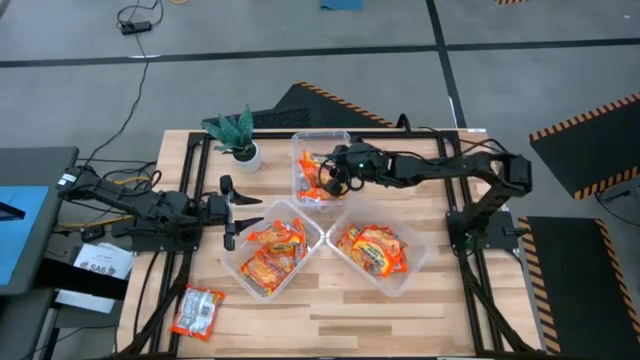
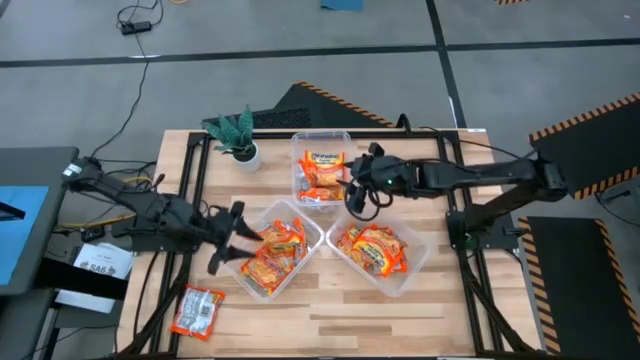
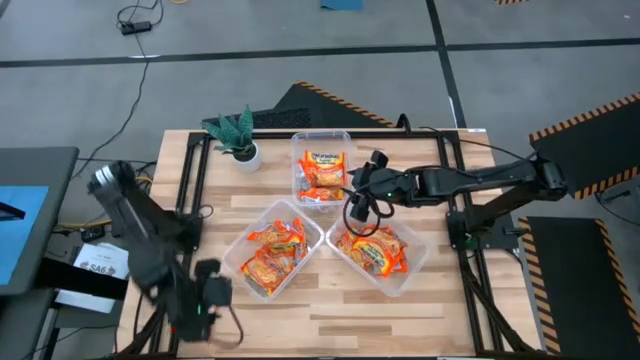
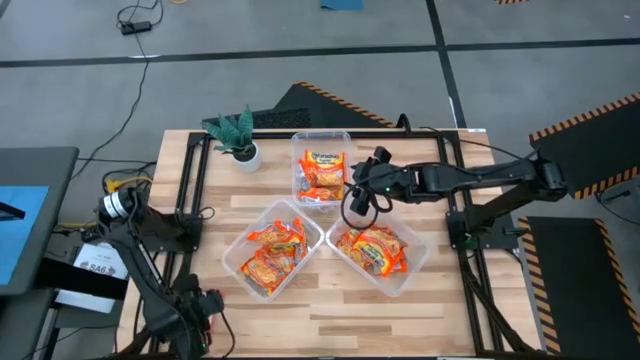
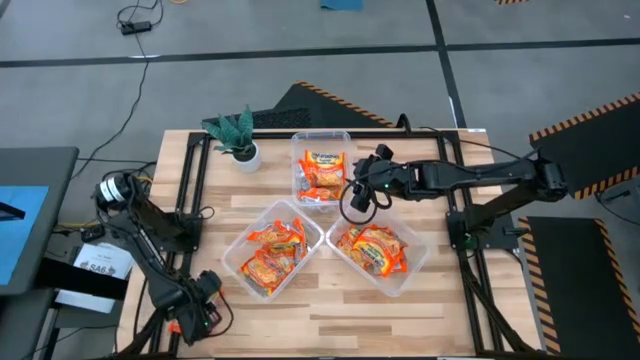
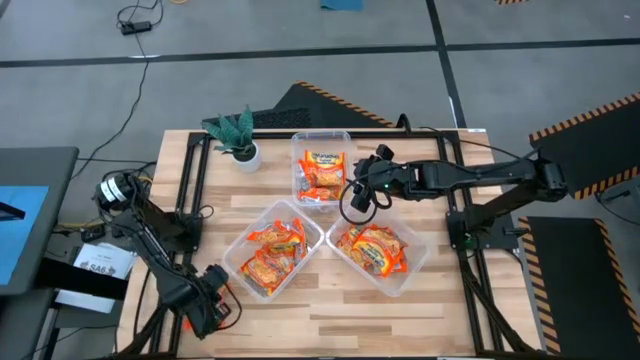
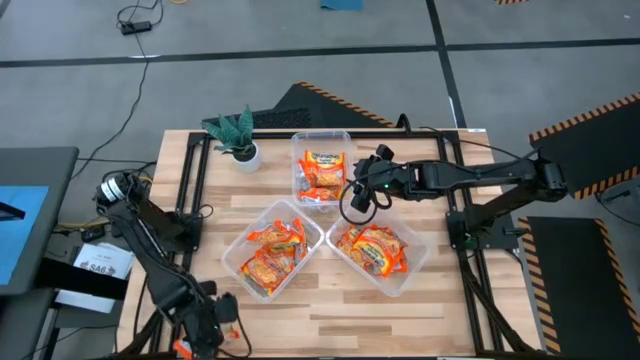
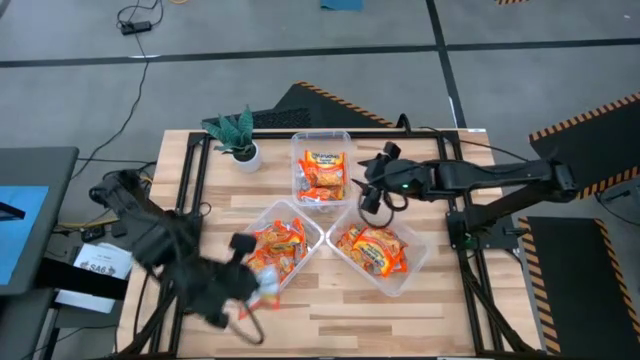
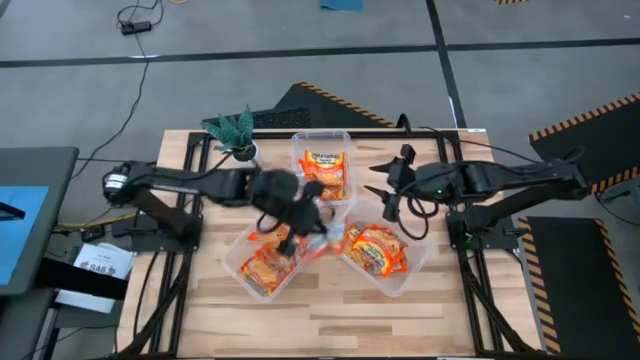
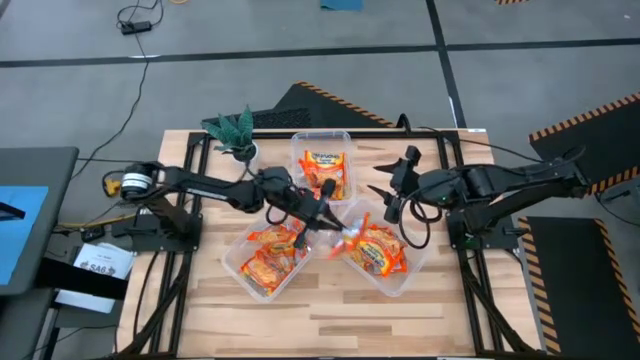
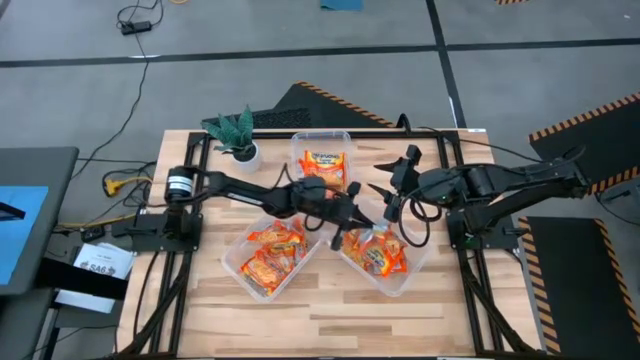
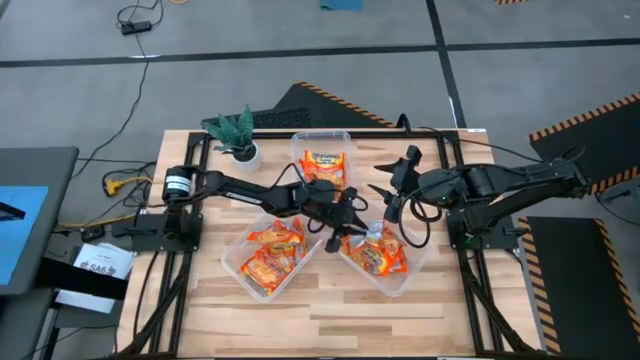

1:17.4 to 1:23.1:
Task: Sort Maruchan noodles
Put the orange noodle pack into the bottom right transparent container

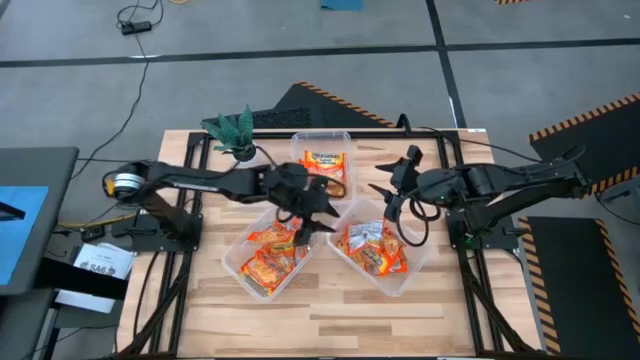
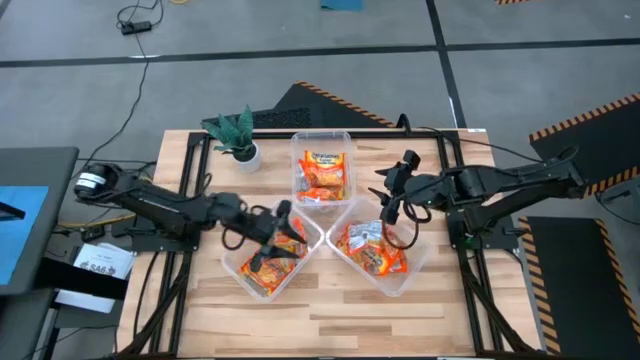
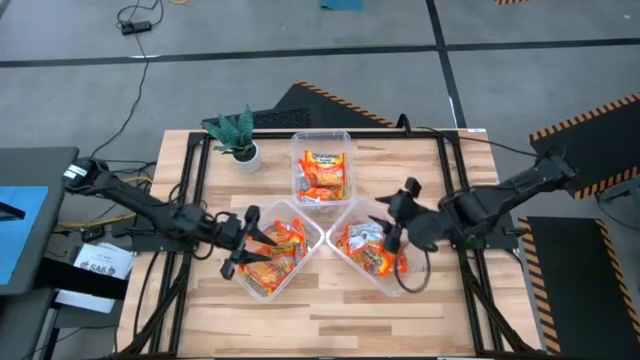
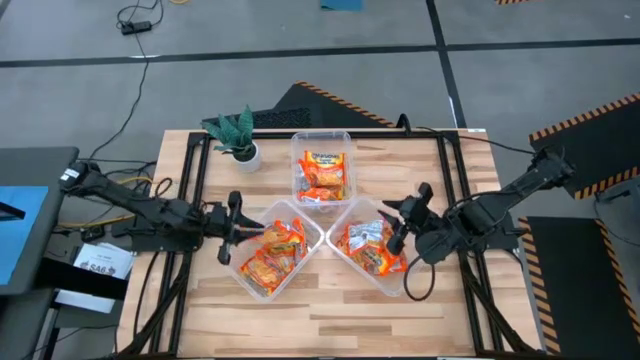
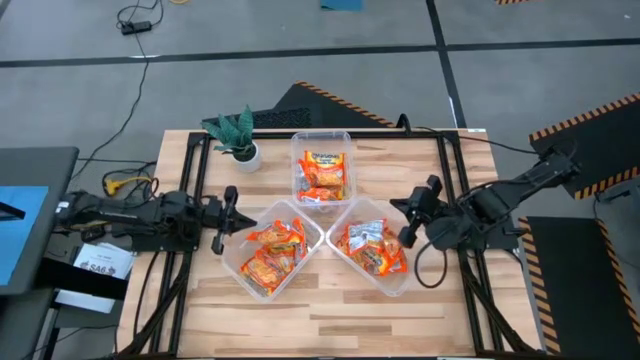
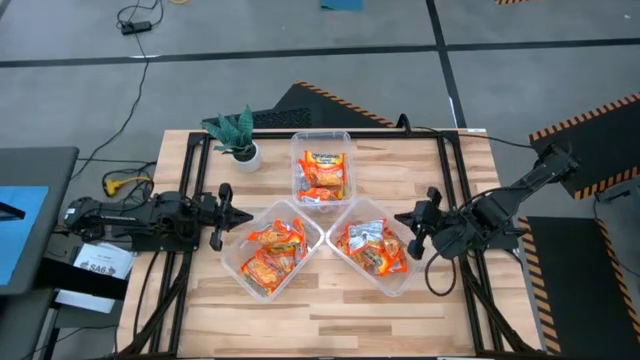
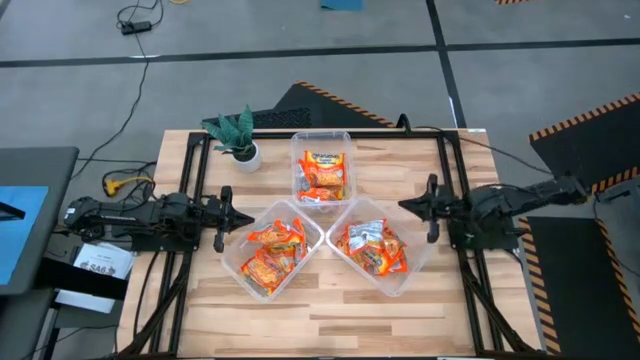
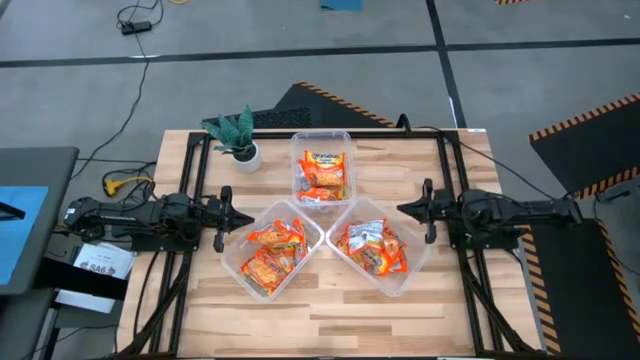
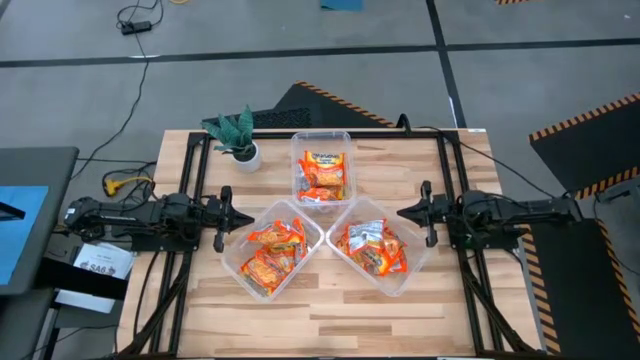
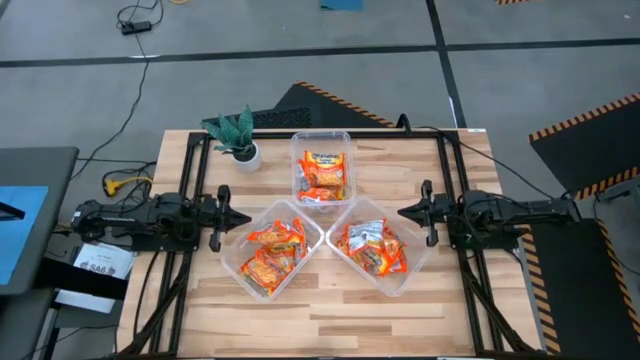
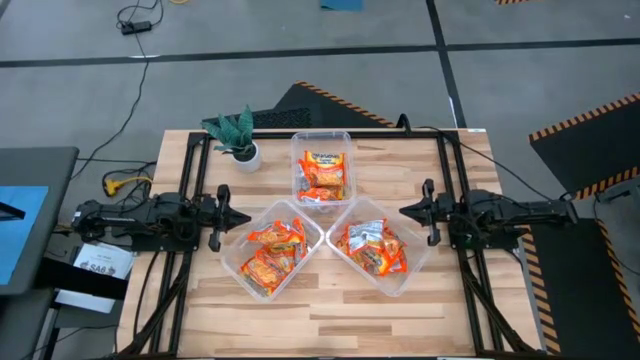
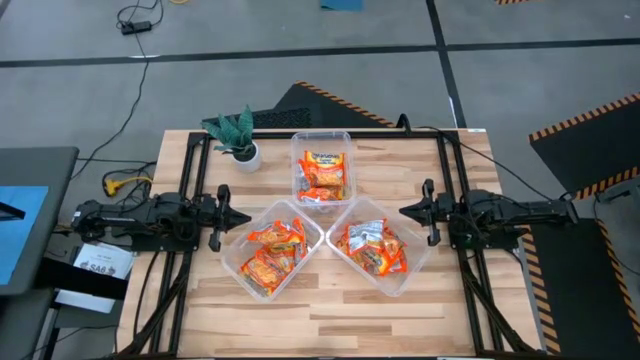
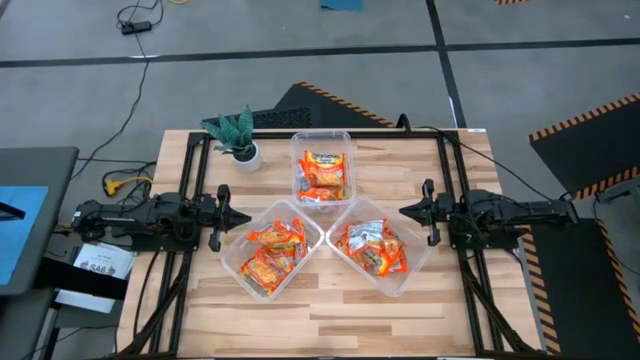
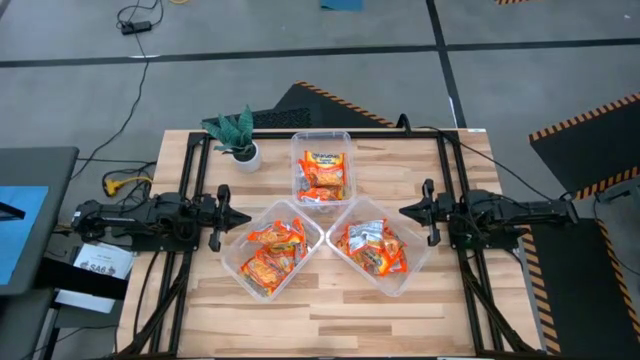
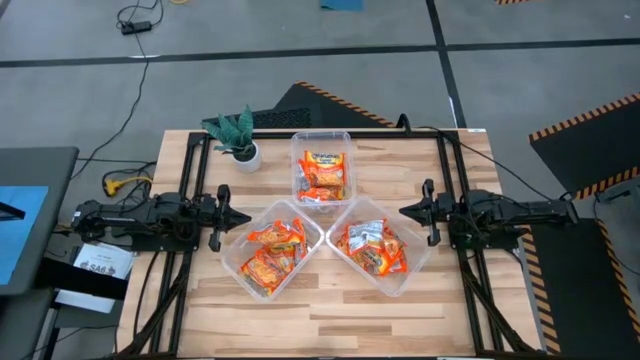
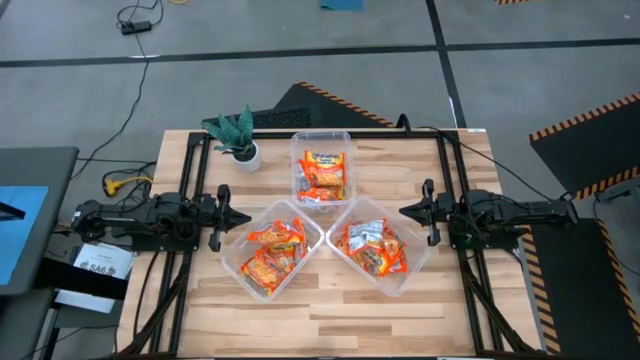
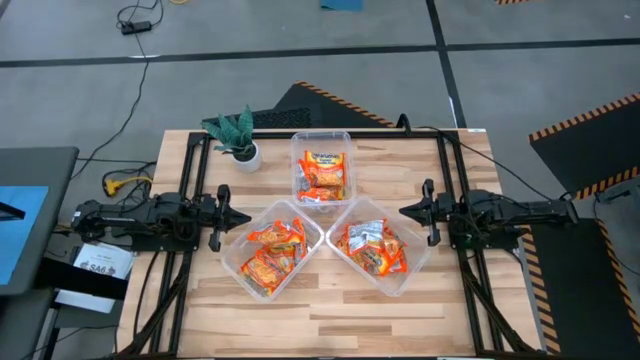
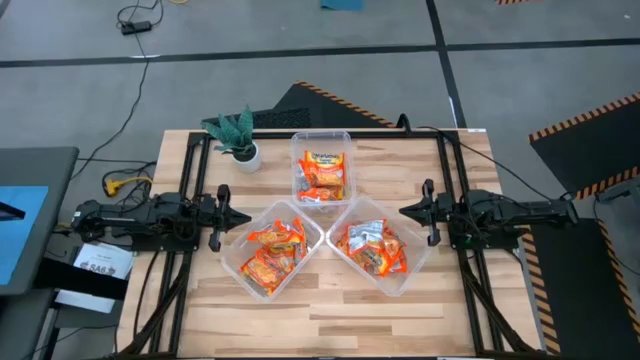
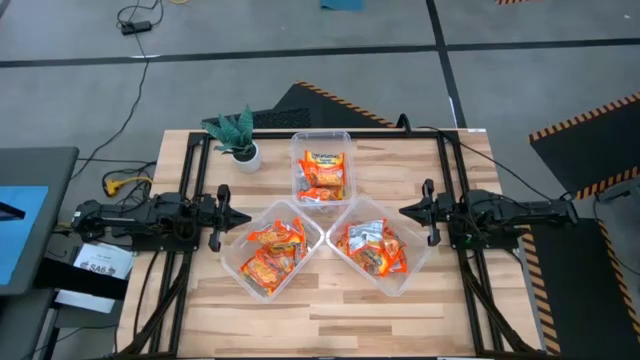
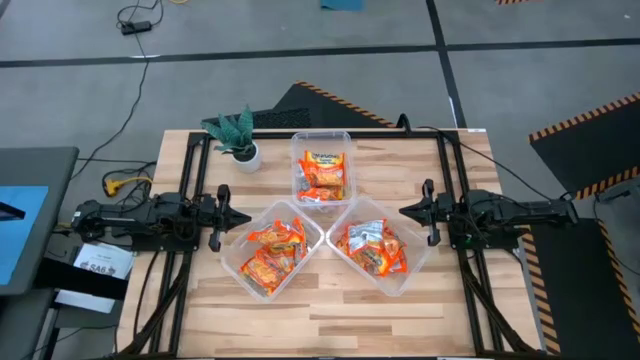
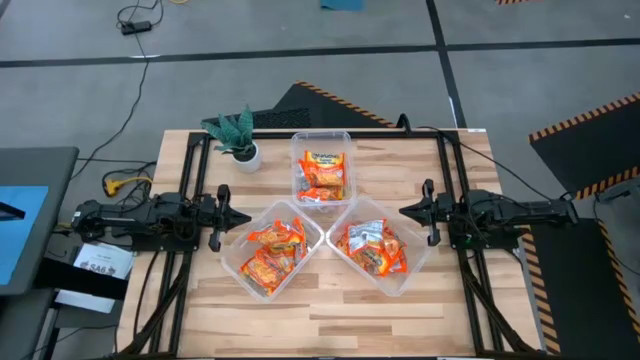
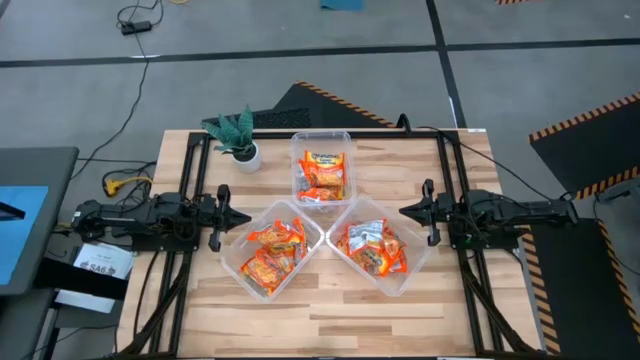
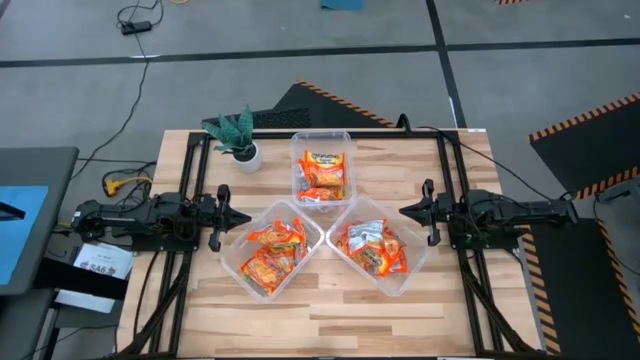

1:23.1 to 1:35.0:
Return to Home Position

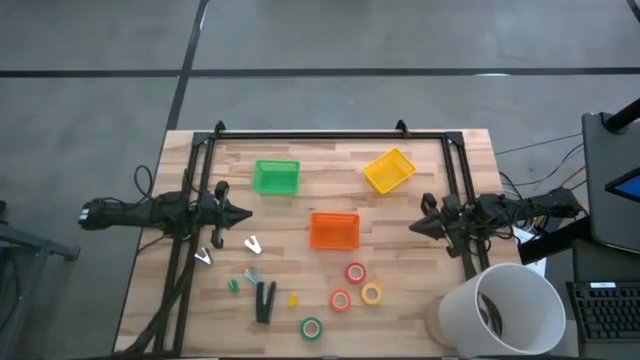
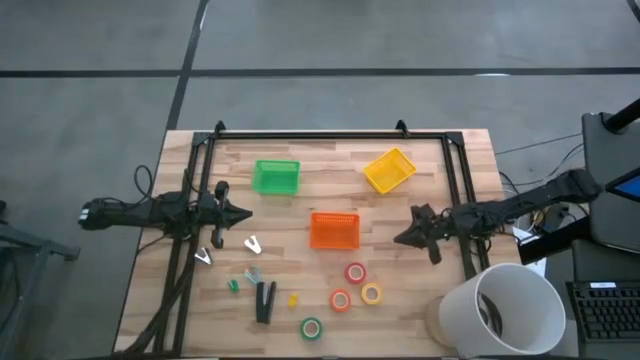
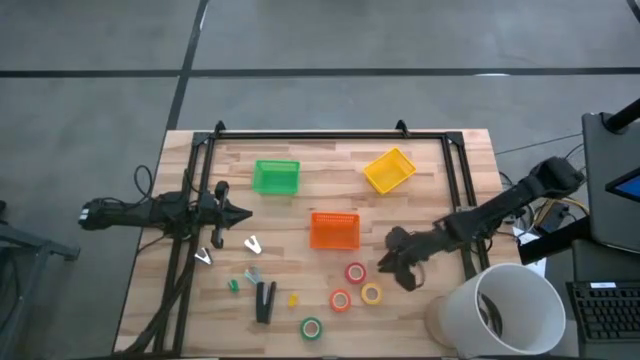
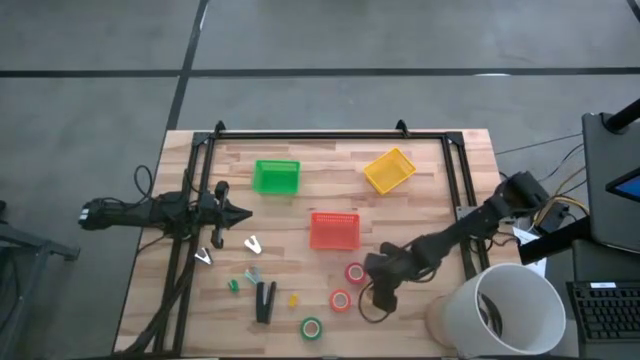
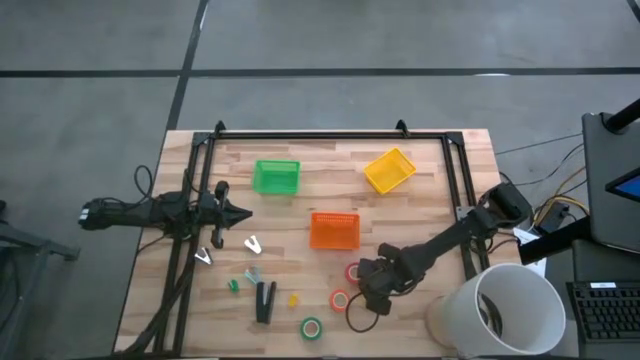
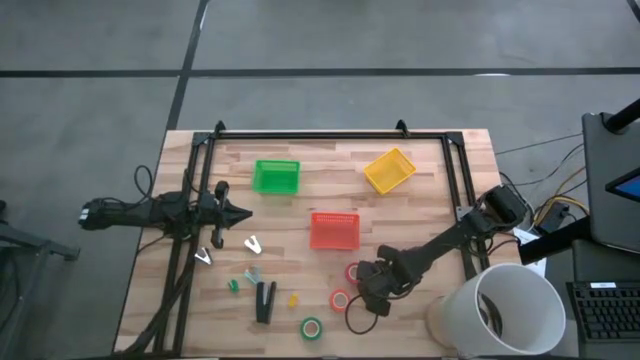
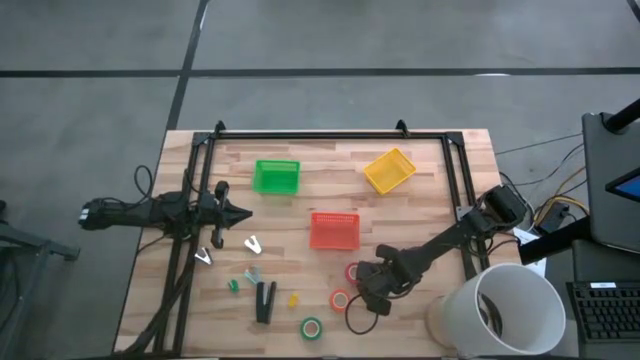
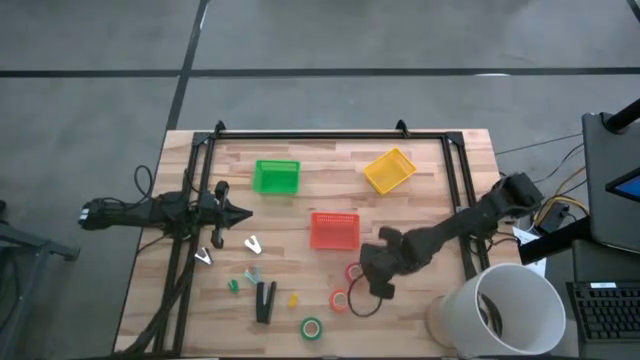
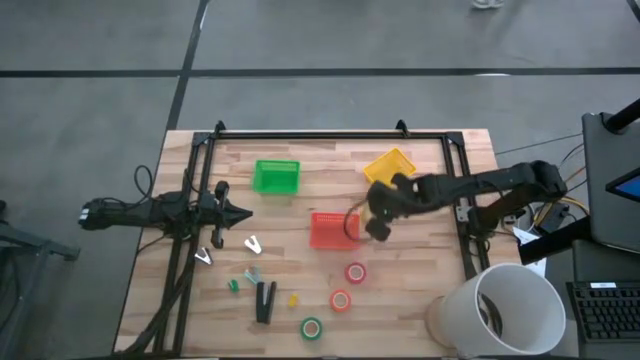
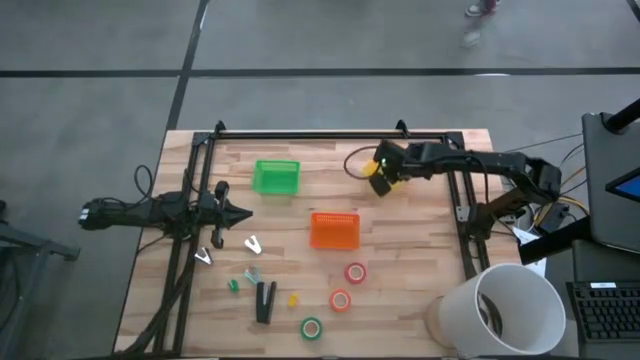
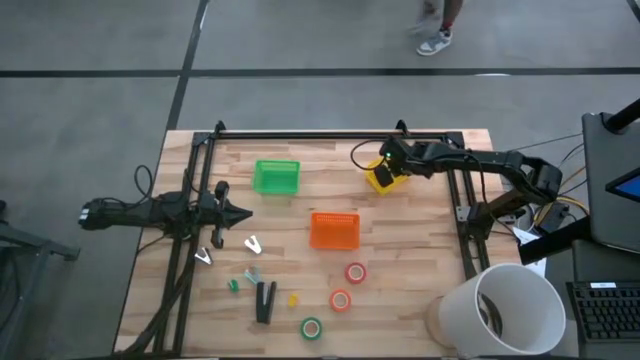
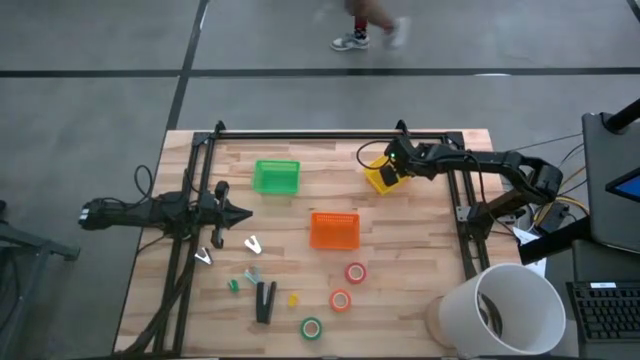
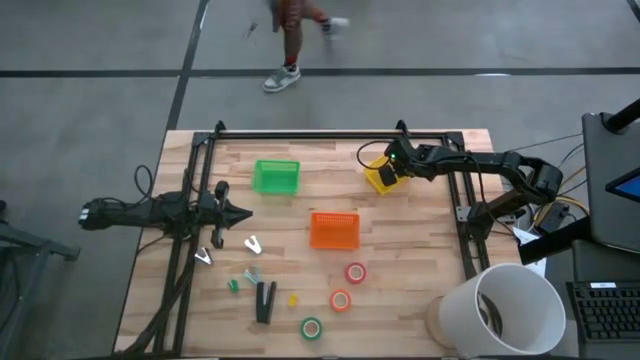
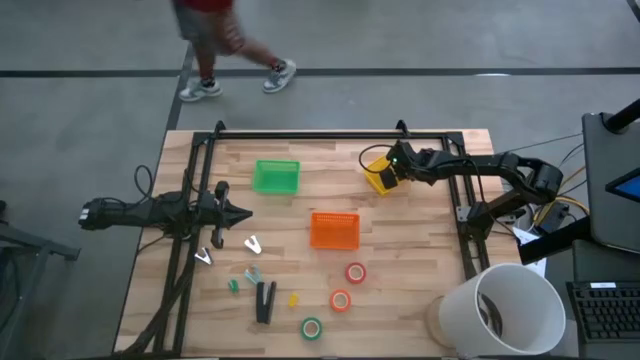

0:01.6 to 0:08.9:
Task: Pick and place Stapler, Stapler remover, tape
Put the yellow tape into the yellow bin
